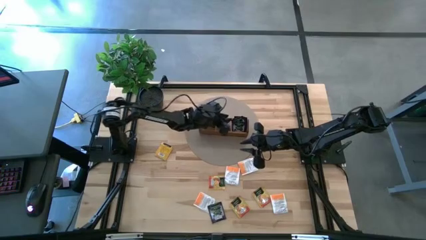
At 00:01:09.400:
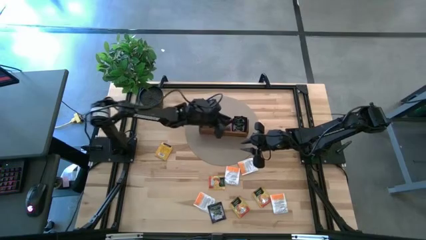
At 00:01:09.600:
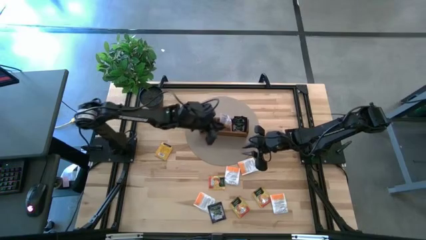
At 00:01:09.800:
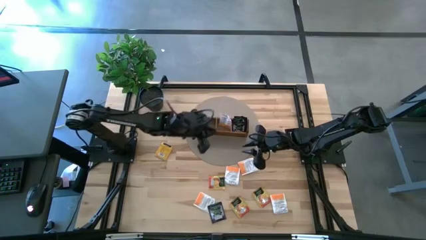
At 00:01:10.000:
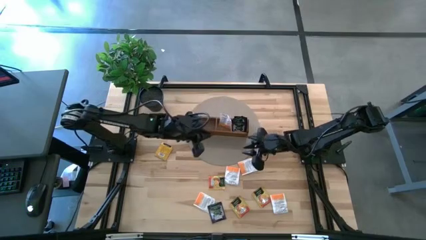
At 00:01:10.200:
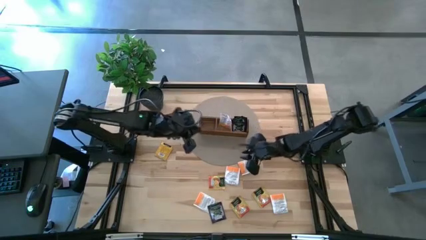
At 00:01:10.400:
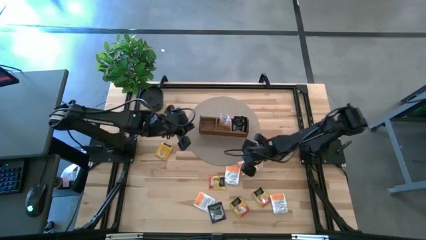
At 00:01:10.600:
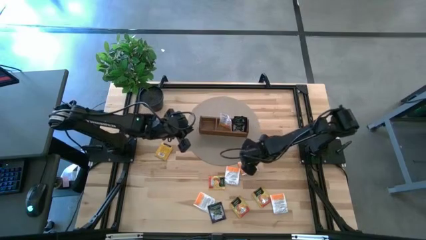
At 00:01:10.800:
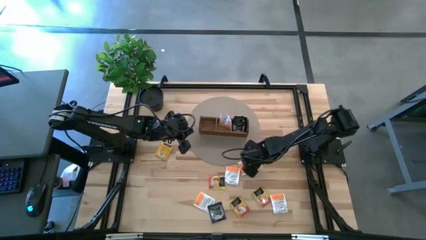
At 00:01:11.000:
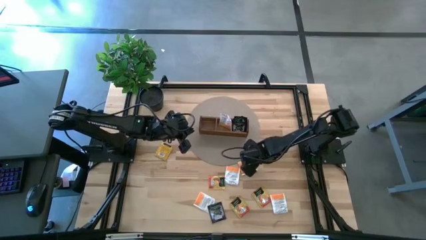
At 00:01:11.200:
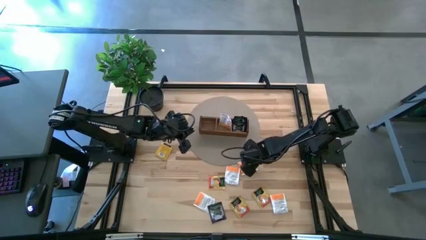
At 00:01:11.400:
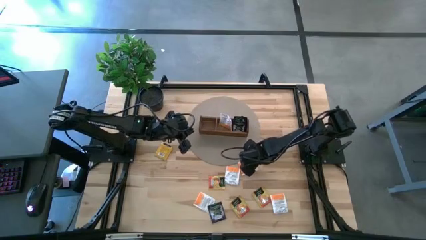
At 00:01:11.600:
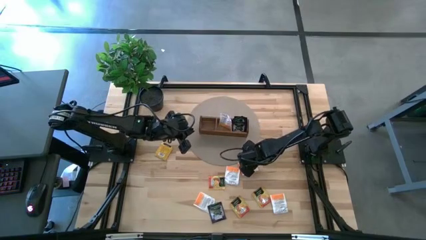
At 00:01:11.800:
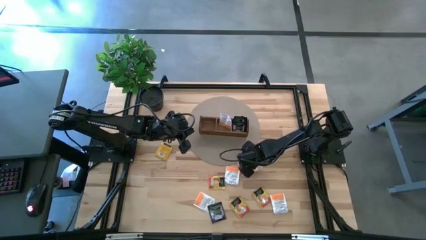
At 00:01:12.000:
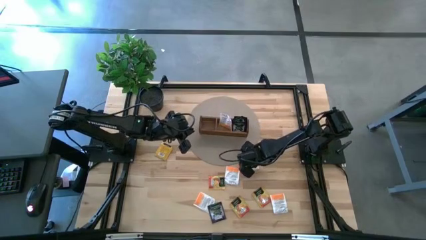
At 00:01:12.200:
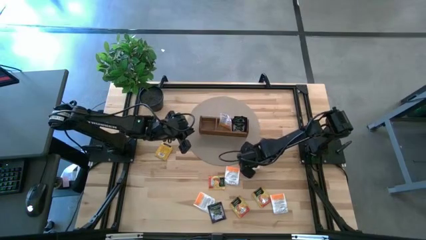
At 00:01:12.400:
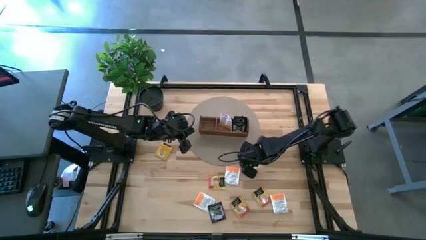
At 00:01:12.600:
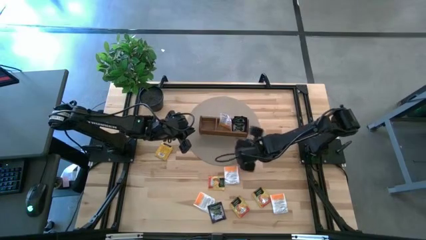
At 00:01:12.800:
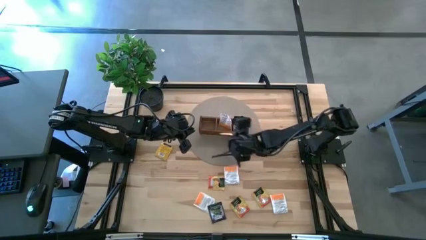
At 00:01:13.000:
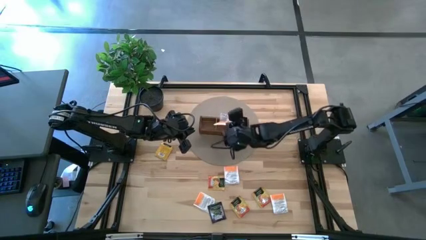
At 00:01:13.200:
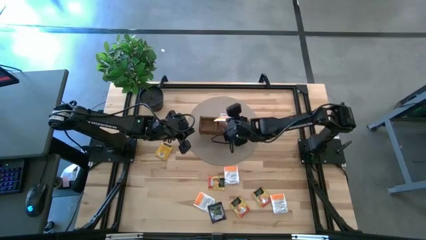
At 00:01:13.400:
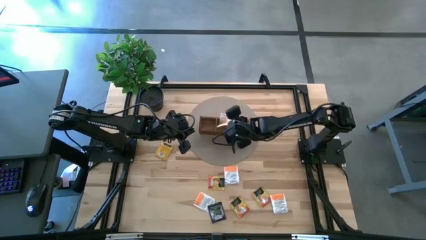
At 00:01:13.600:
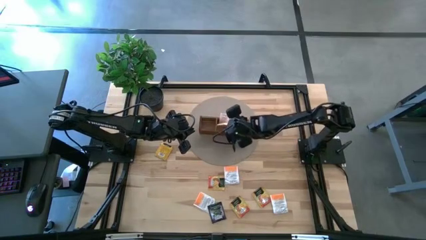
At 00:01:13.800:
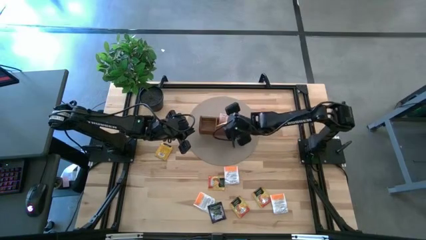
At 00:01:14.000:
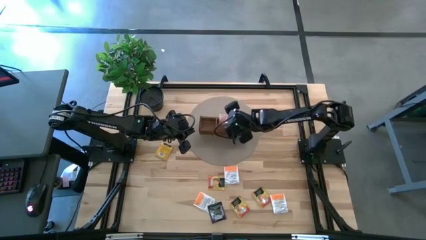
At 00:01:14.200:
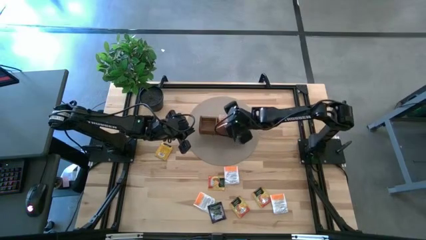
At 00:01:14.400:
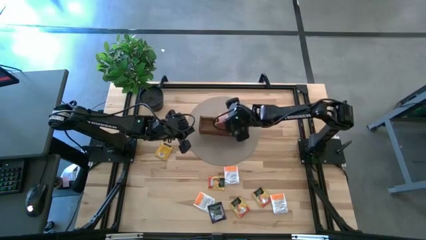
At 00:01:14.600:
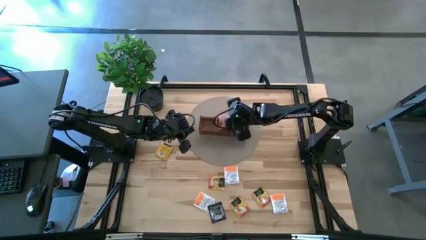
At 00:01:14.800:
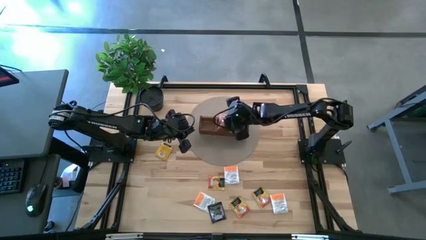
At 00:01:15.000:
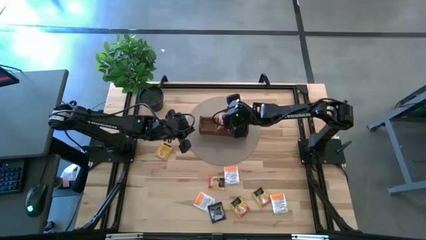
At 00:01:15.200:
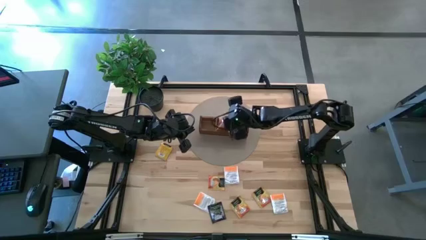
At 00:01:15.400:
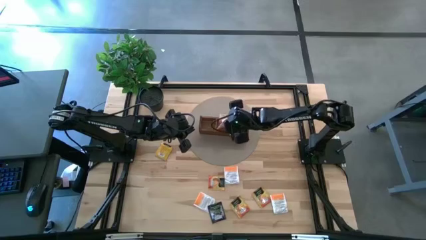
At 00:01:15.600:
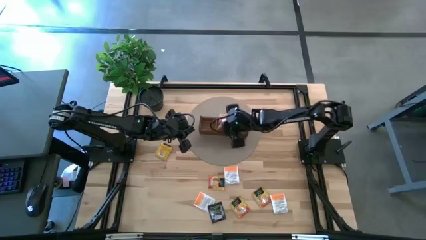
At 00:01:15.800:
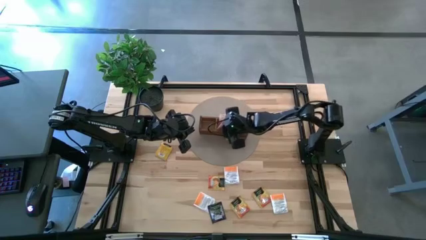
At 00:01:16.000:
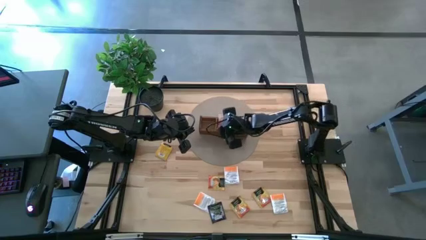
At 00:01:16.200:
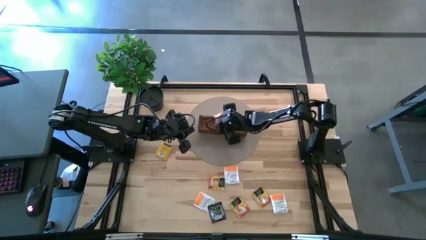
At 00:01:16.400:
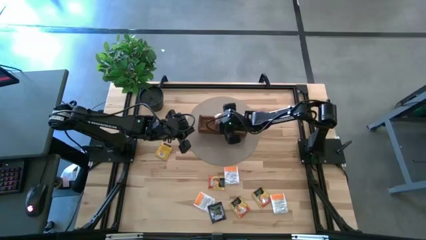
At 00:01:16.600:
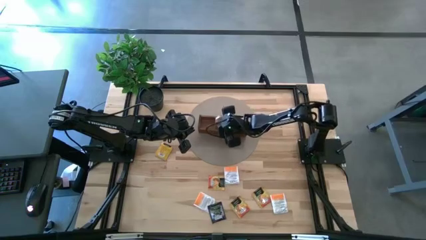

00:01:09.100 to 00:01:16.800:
Task: Pick & Place Tea
Put the white tea bag into the middle section of the wooden organizer

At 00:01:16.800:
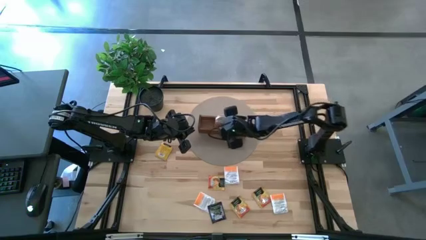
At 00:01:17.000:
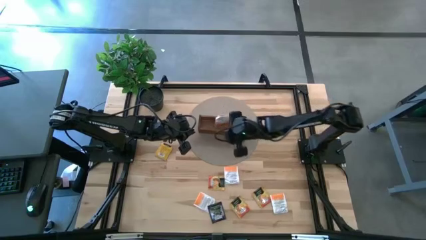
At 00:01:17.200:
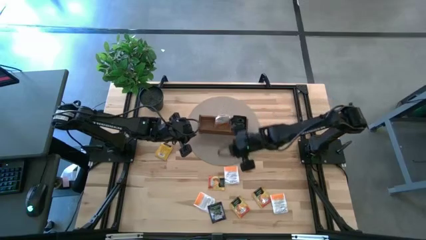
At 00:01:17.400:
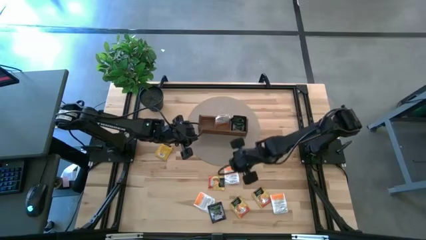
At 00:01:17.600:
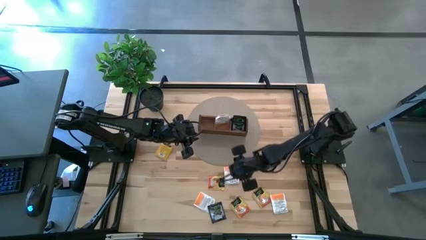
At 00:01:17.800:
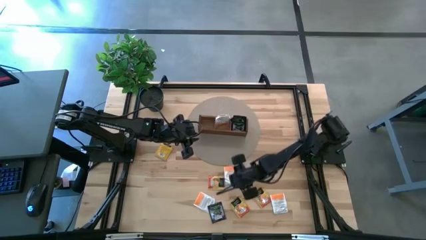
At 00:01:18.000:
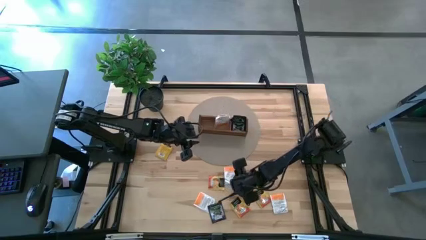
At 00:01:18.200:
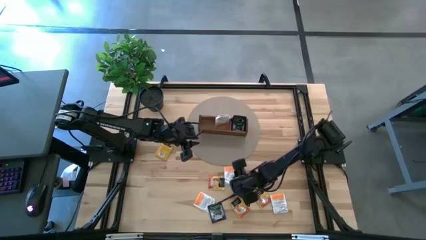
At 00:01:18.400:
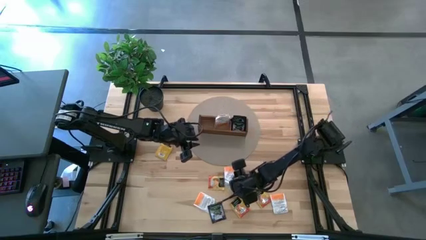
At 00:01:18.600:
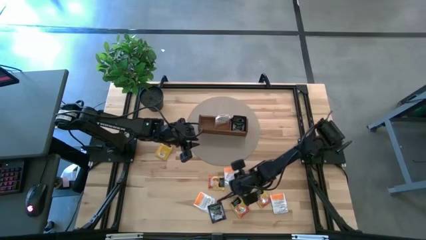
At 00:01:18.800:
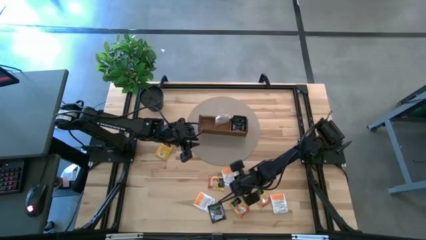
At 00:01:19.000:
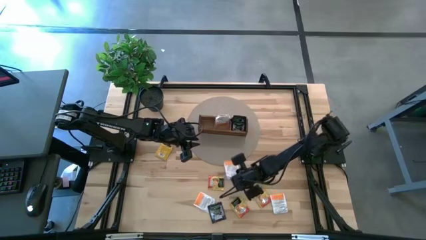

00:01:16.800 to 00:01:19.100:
Put the white tea bag into the middle section of the wooden organizer
